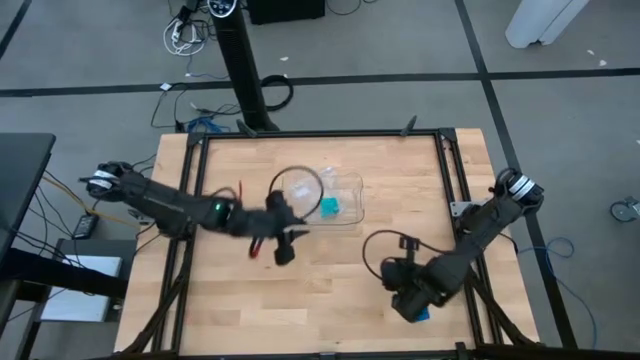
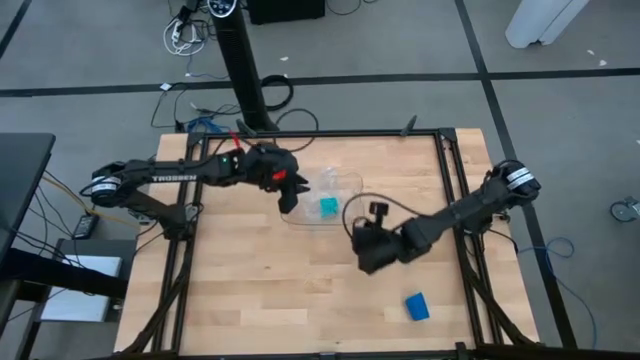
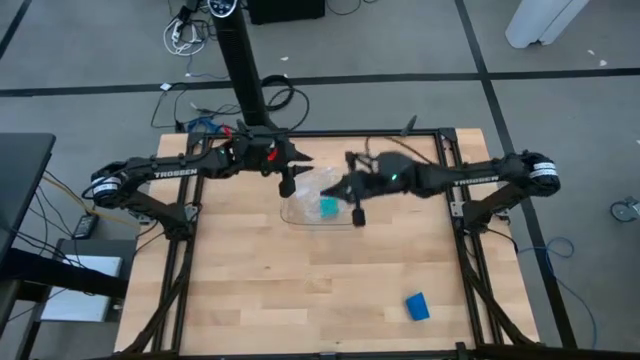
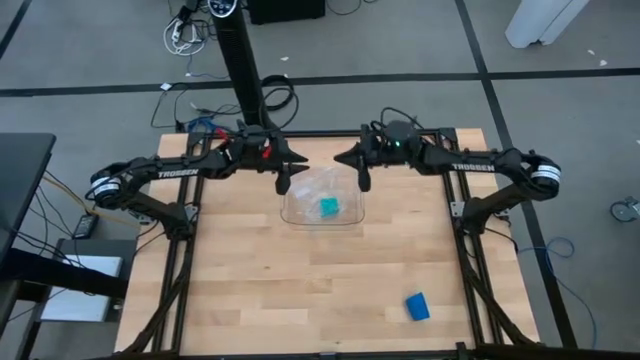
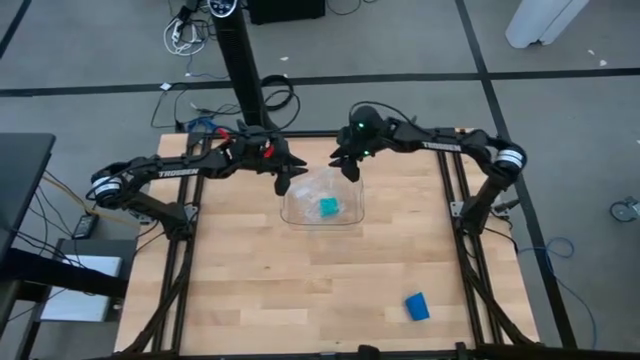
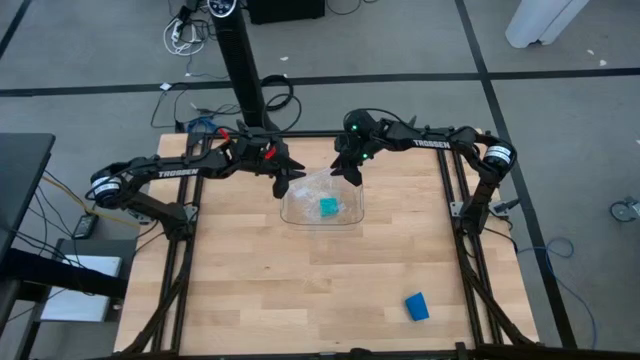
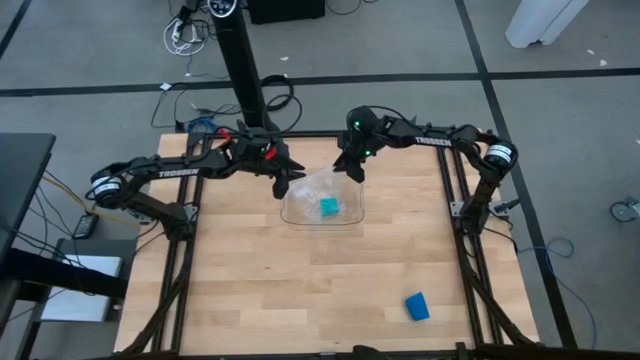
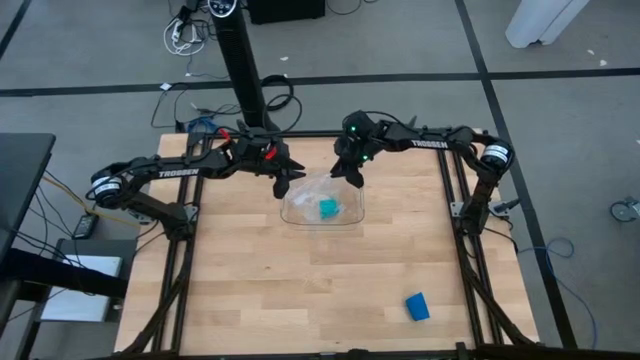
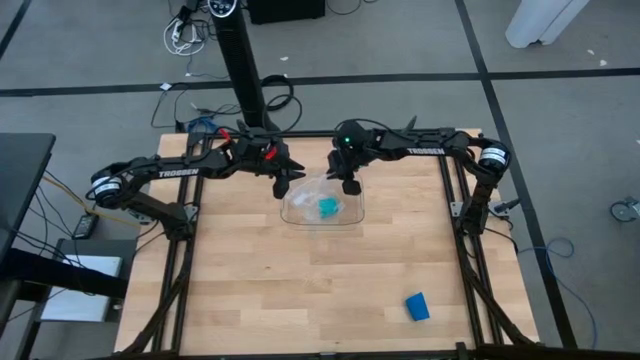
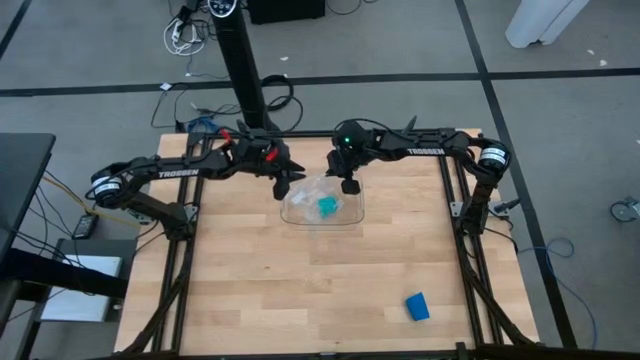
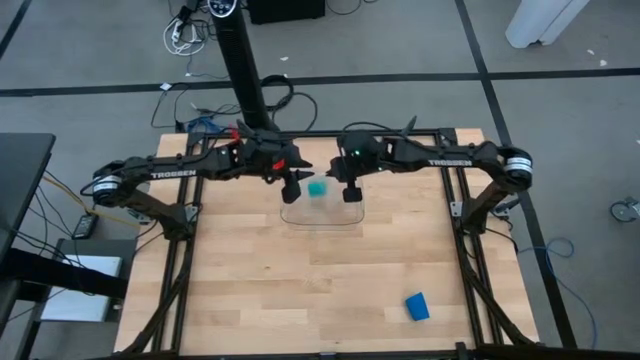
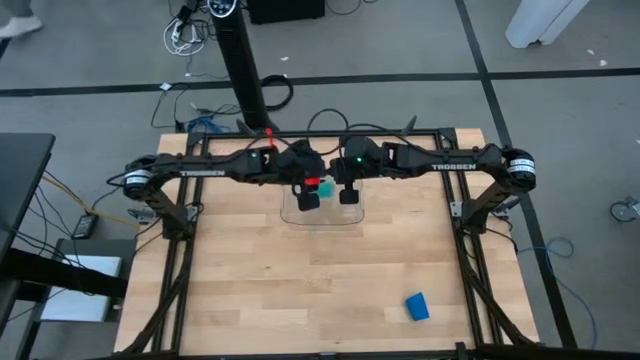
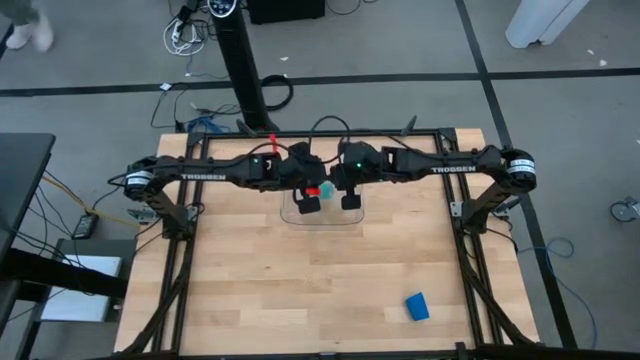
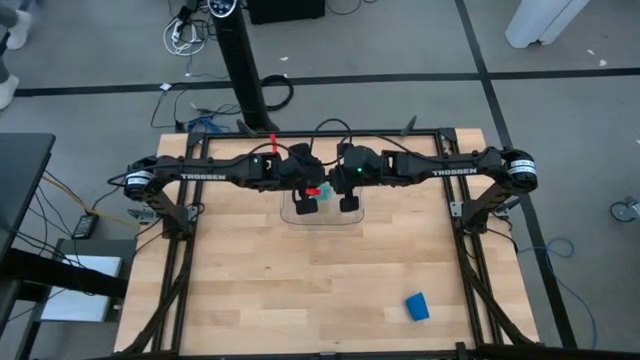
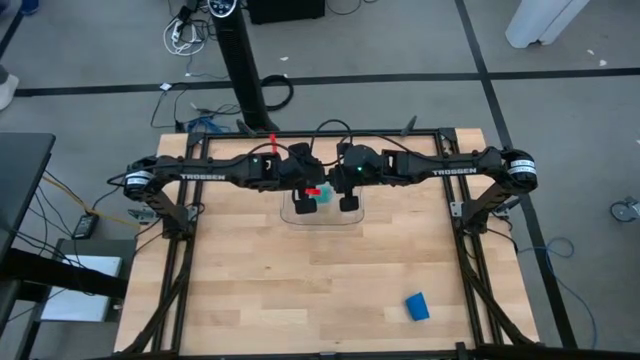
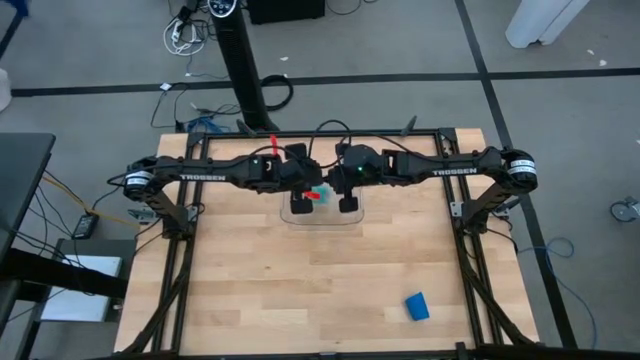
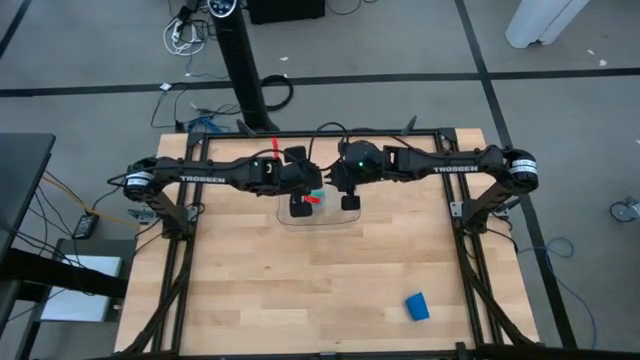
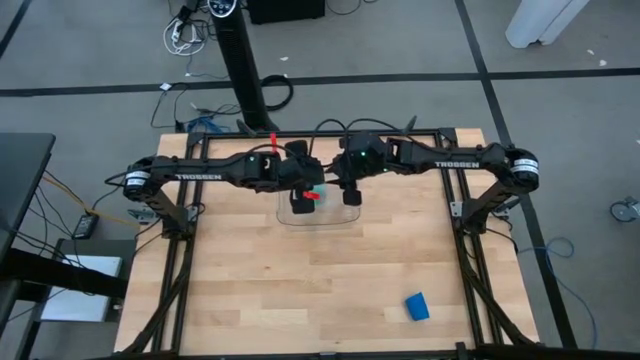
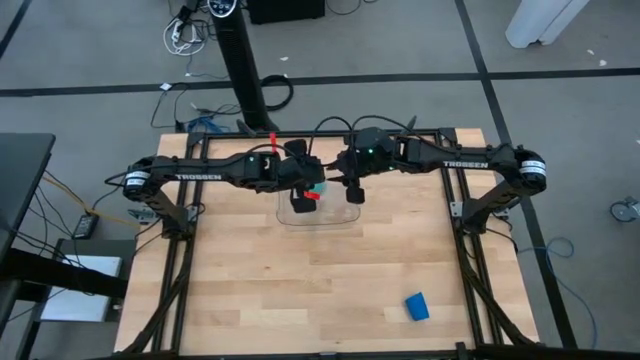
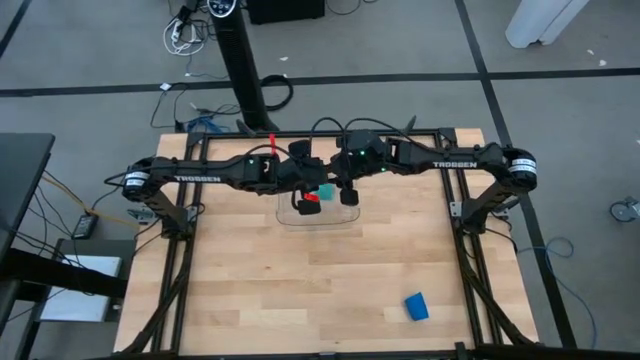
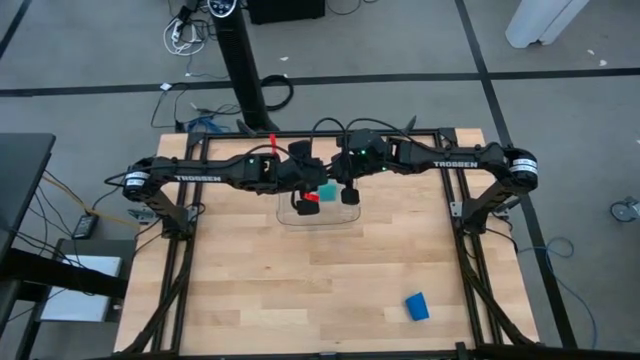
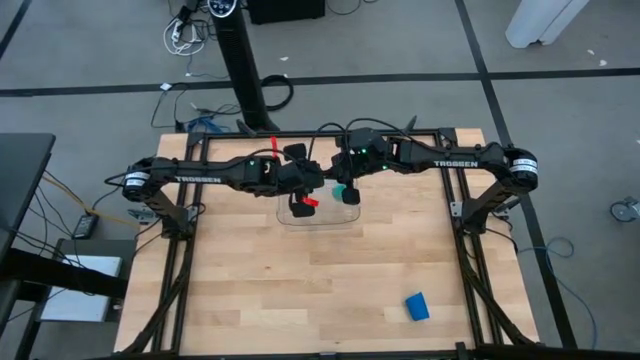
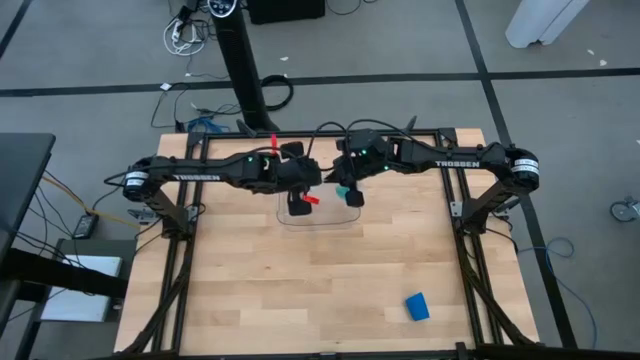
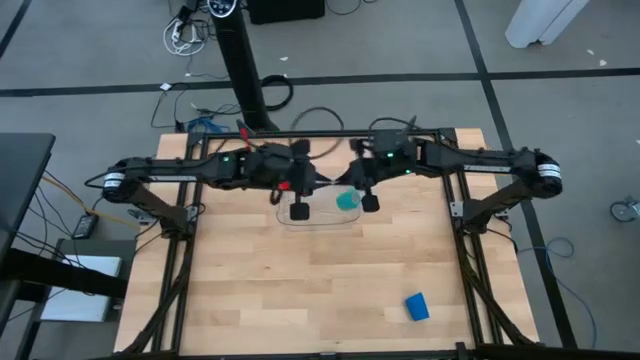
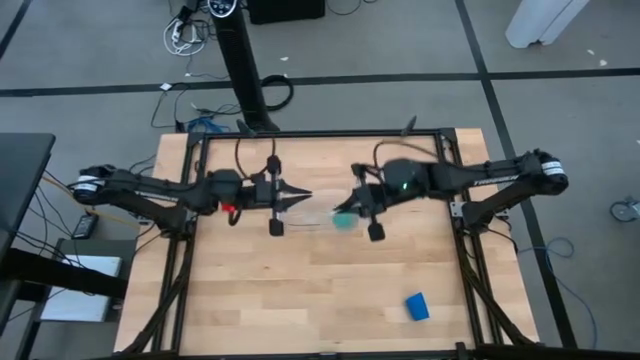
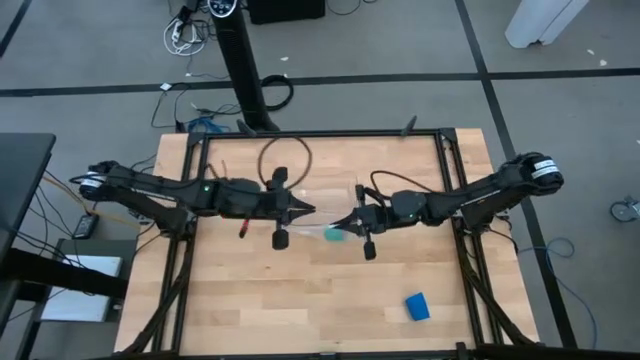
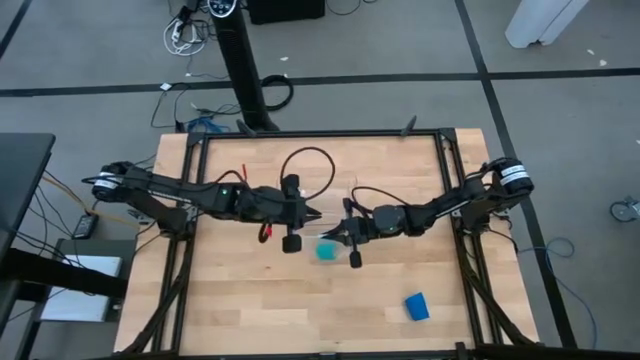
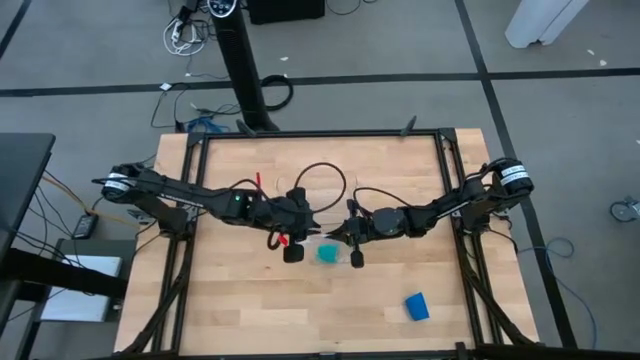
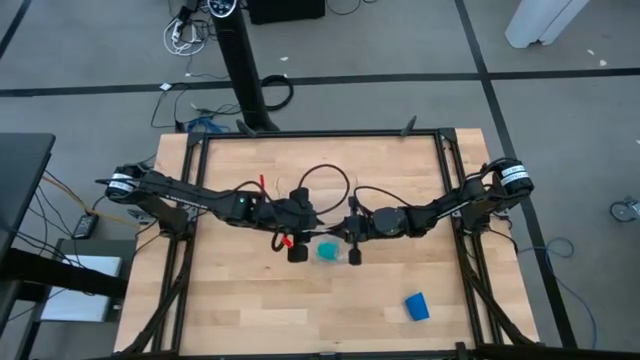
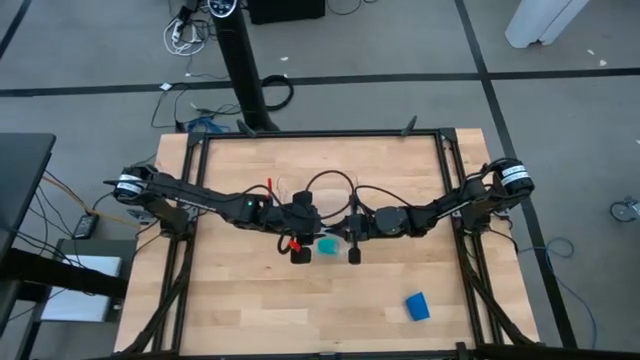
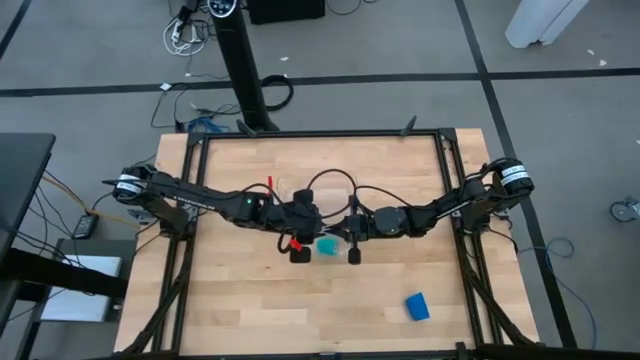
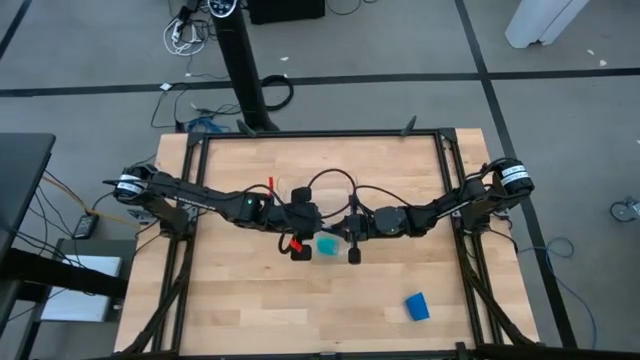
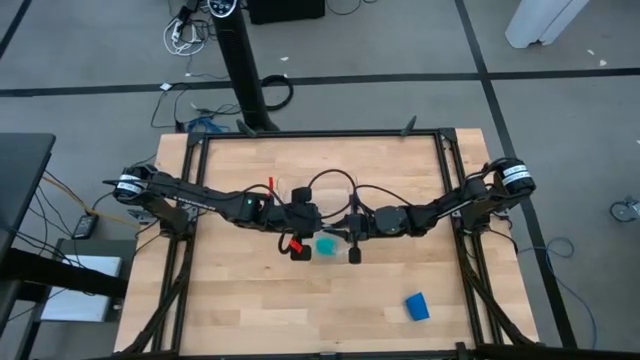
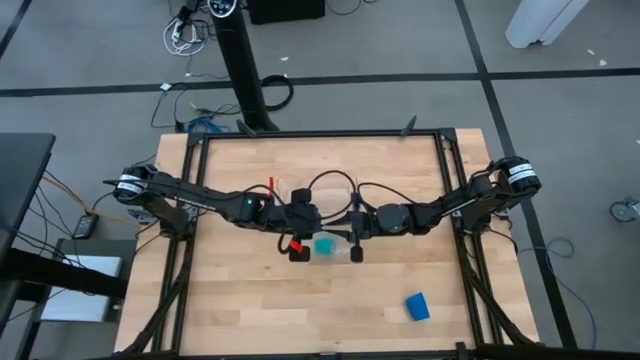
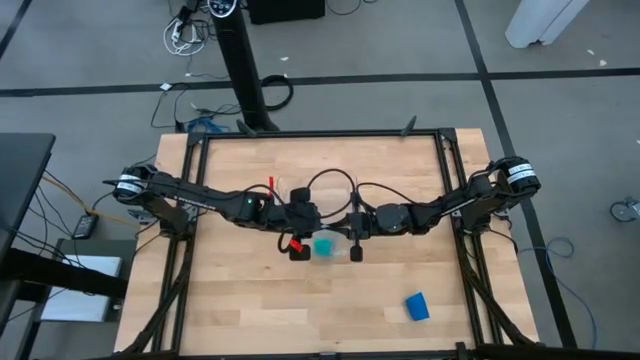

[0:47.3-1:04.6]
Task: Roll bandage
Open the transparent zip bag

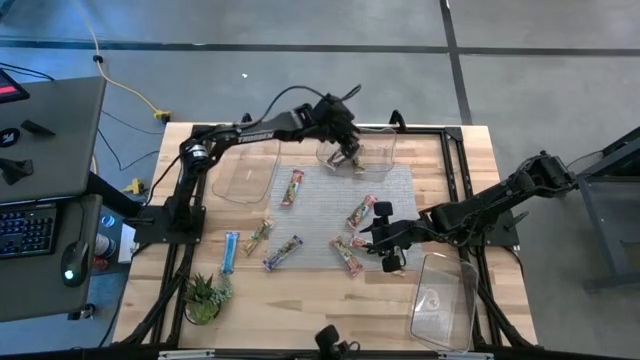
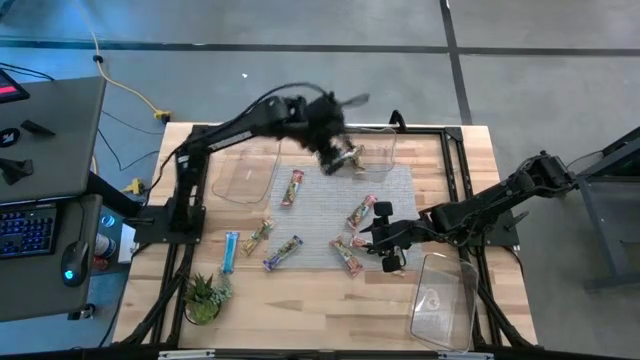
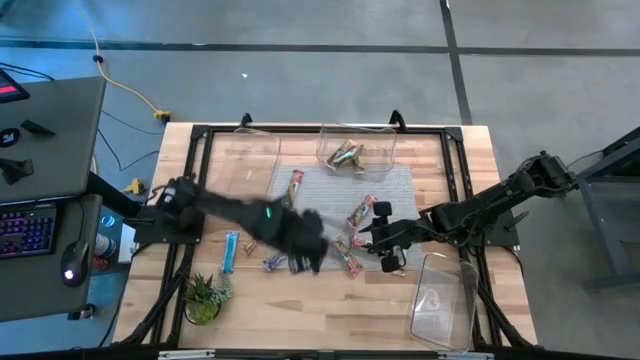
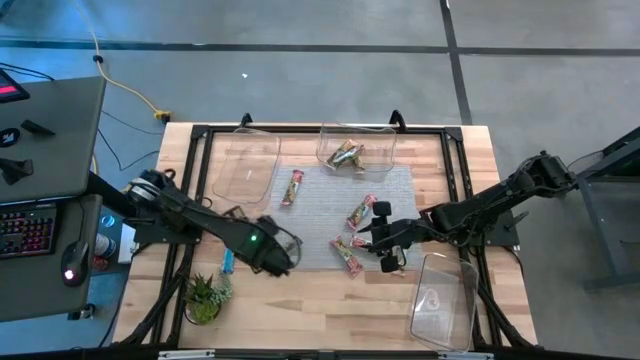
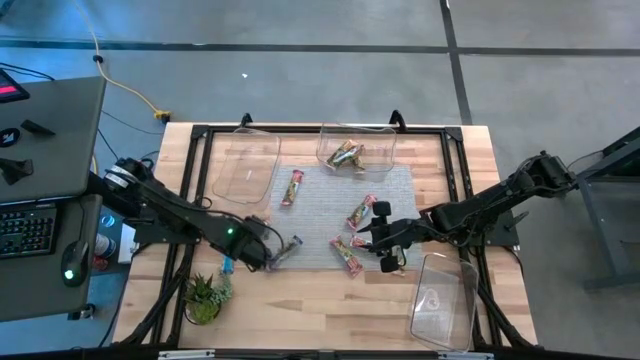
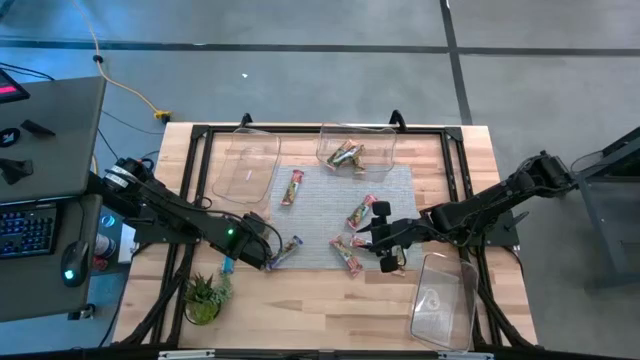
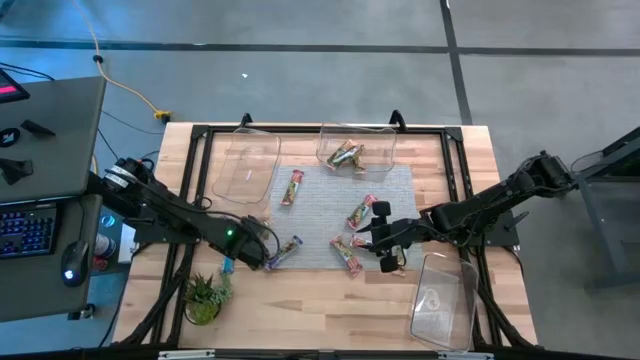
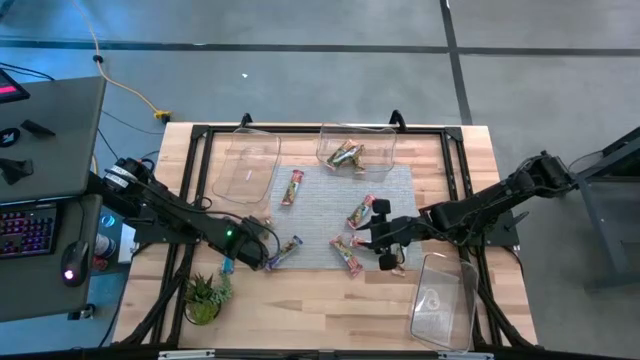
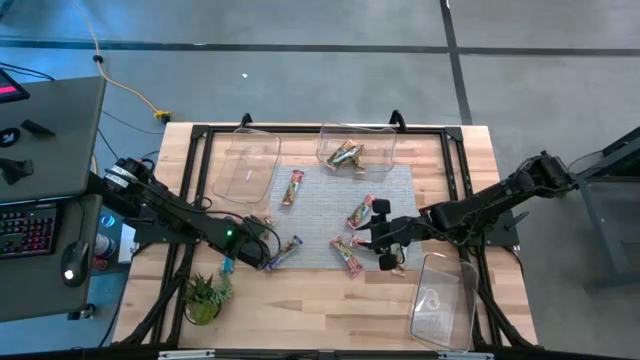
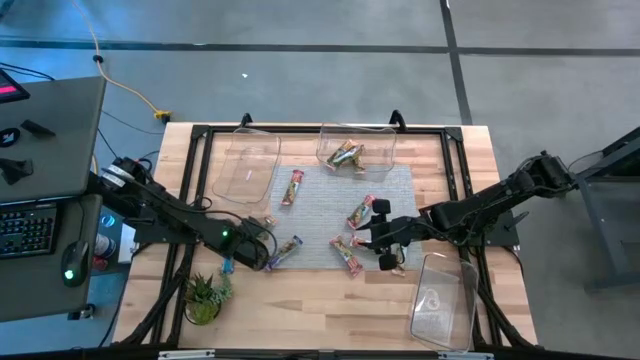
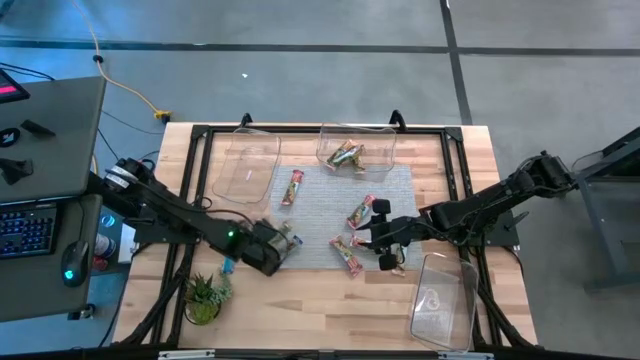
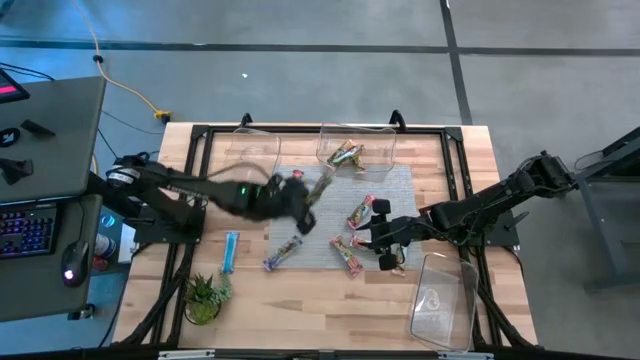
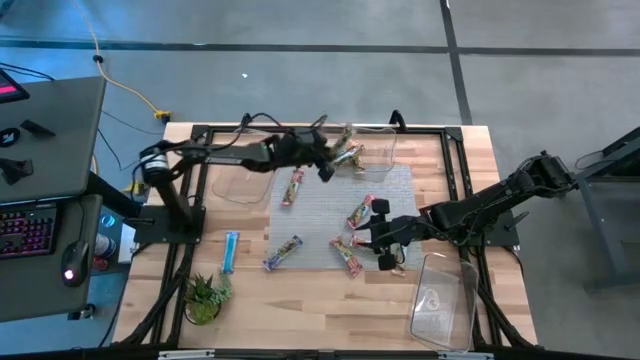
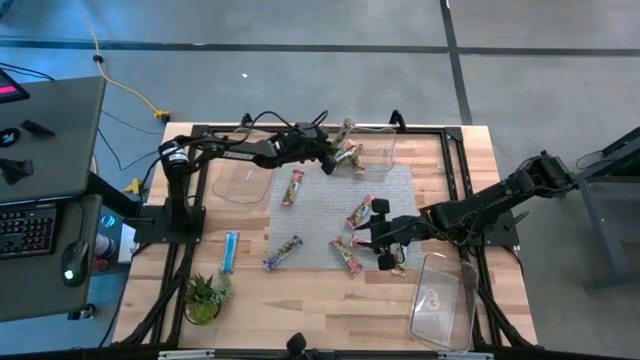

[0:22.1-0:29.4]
Task: Pick and place Granola Bars by type
Put the yellow granola bar into the top right transparent bin
